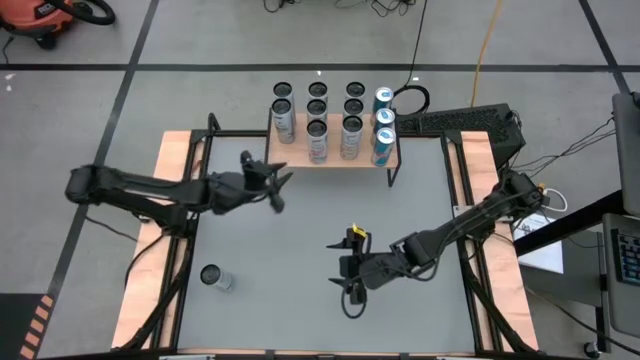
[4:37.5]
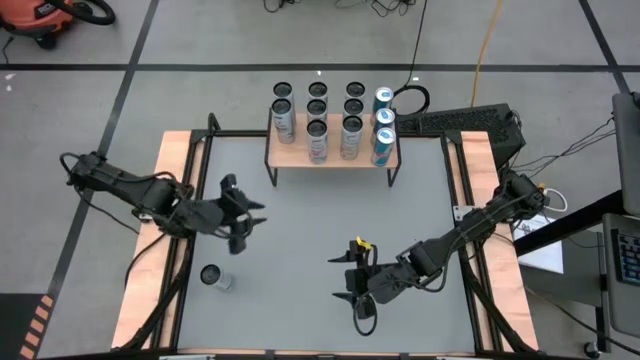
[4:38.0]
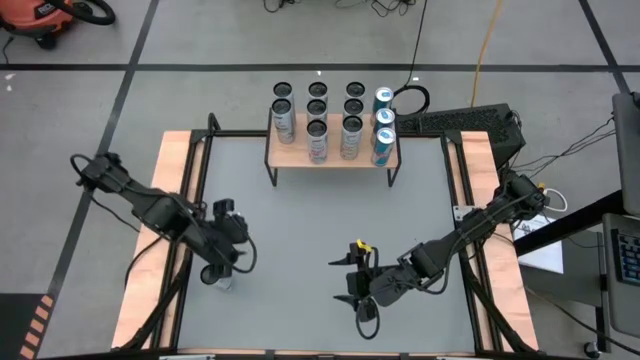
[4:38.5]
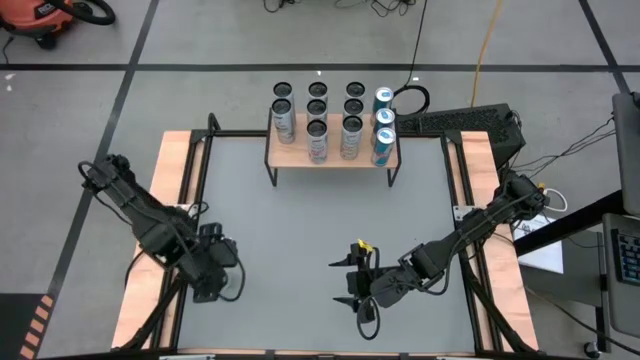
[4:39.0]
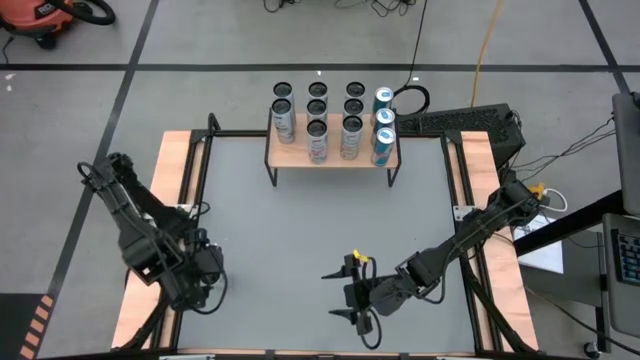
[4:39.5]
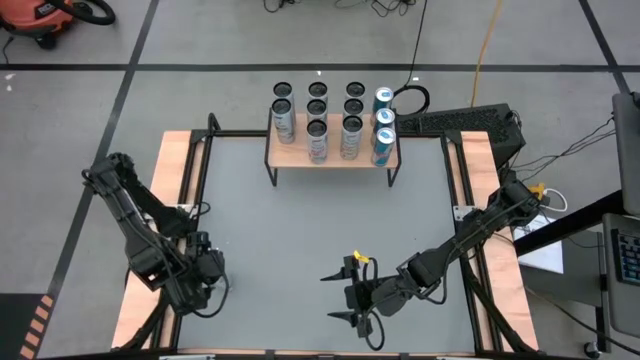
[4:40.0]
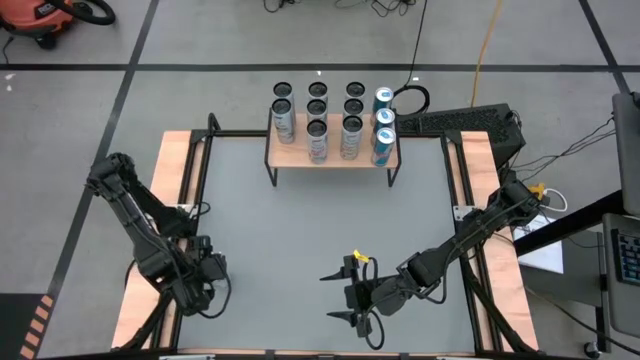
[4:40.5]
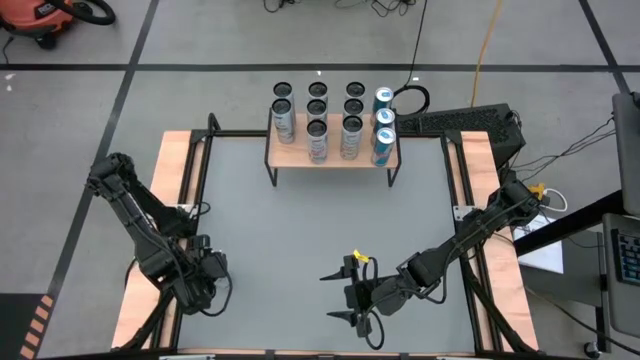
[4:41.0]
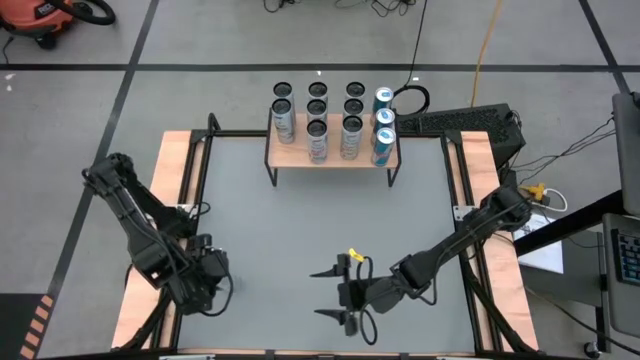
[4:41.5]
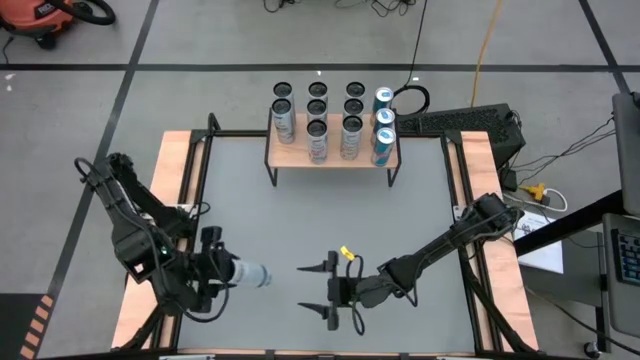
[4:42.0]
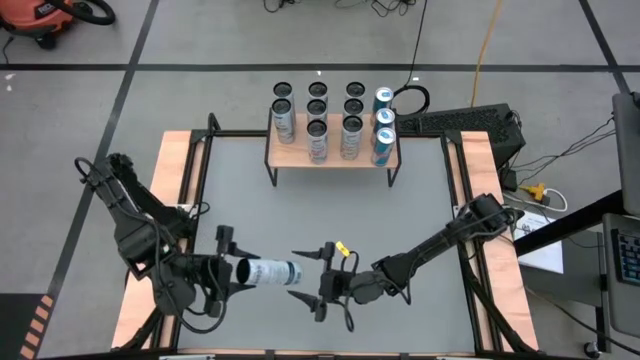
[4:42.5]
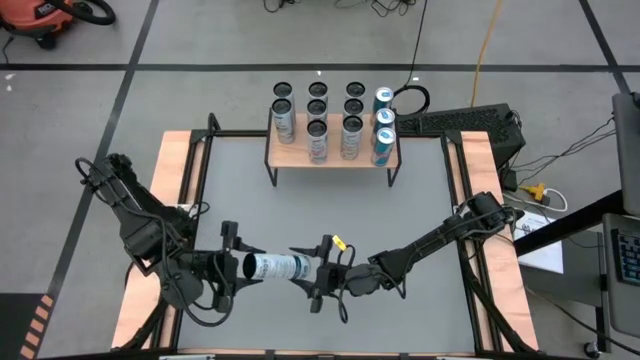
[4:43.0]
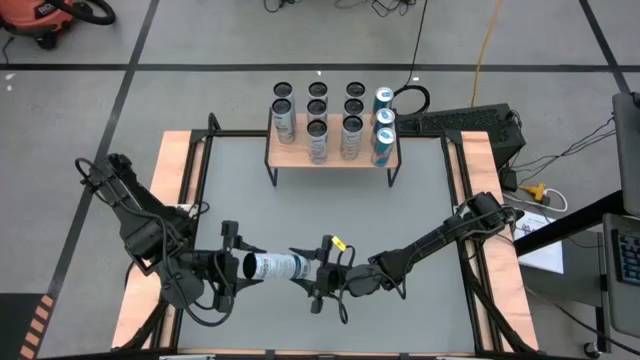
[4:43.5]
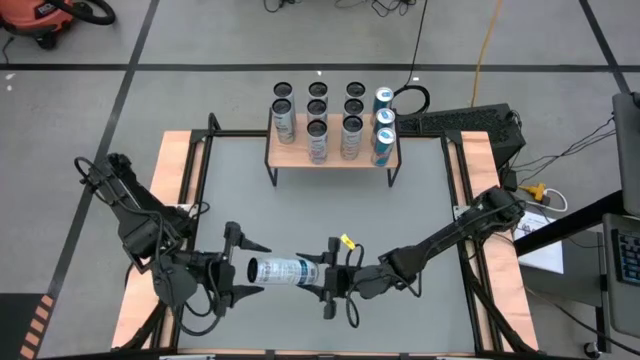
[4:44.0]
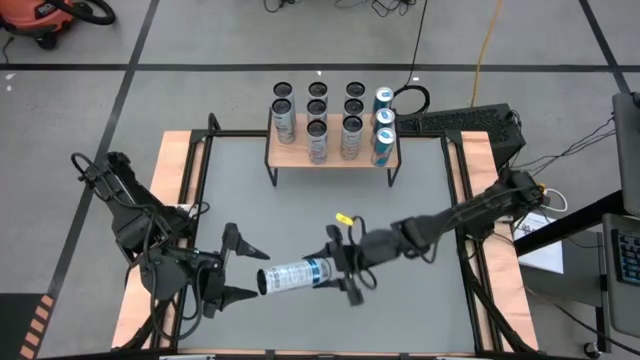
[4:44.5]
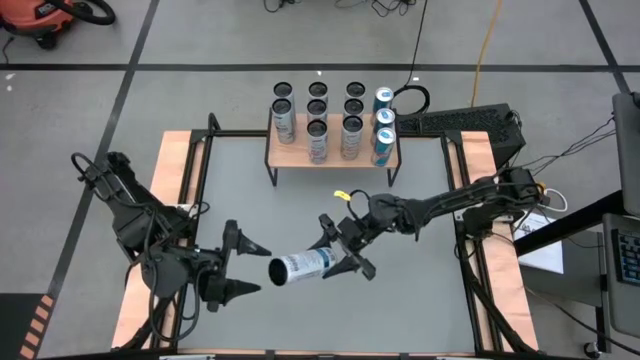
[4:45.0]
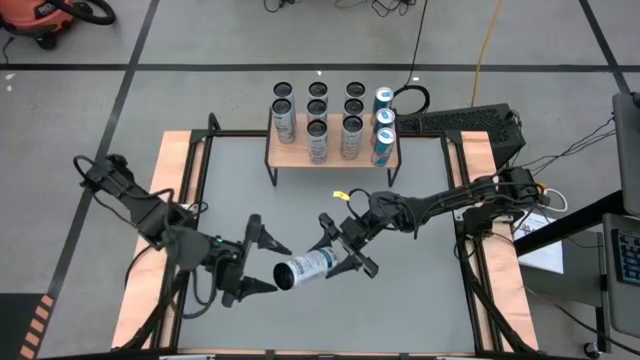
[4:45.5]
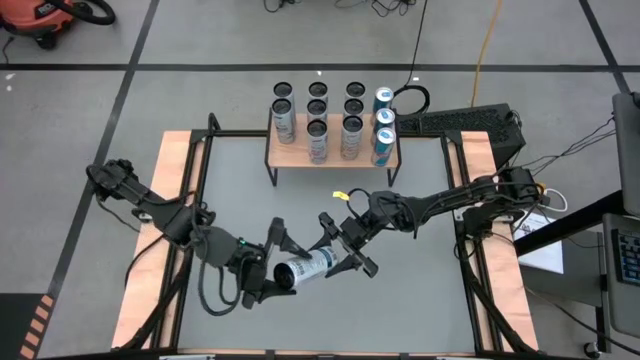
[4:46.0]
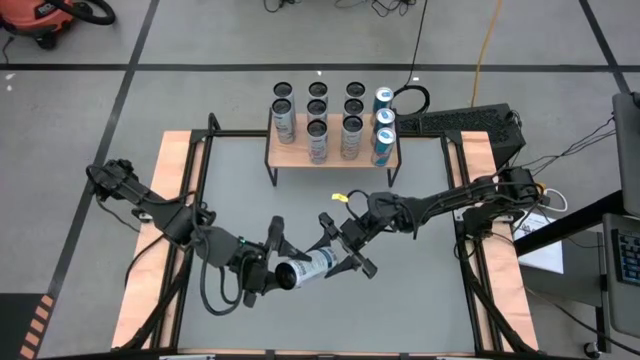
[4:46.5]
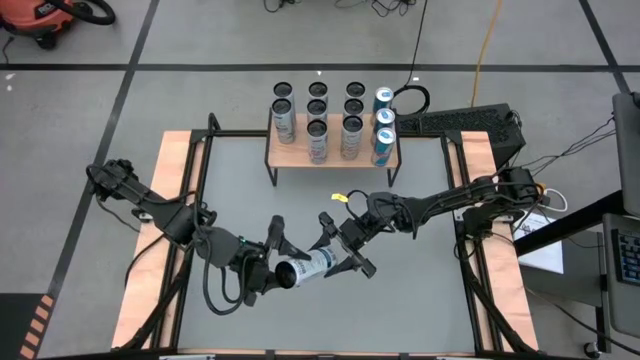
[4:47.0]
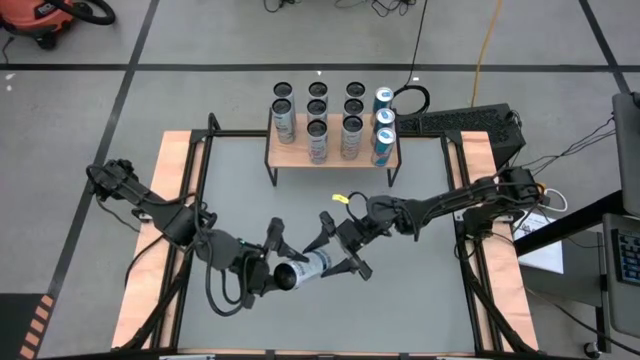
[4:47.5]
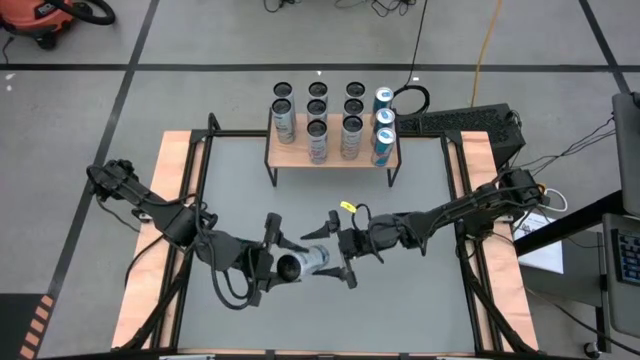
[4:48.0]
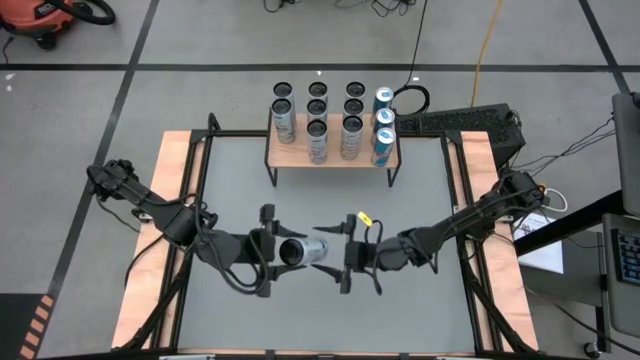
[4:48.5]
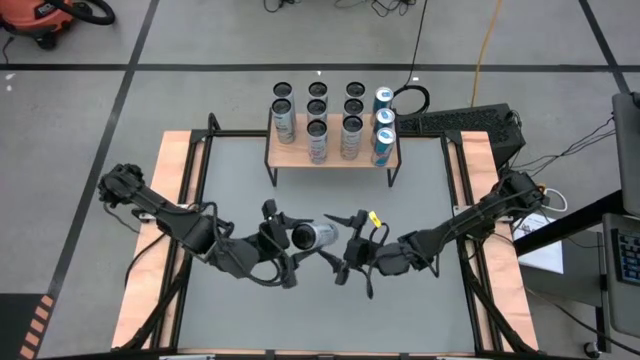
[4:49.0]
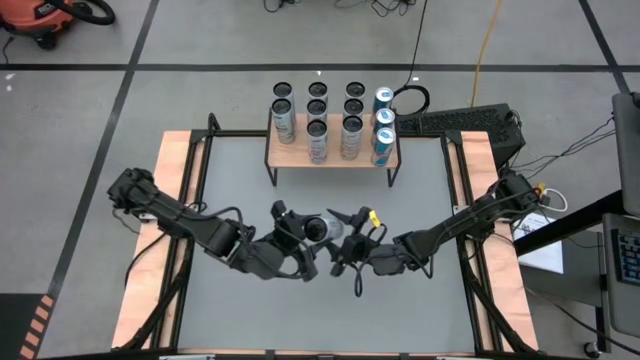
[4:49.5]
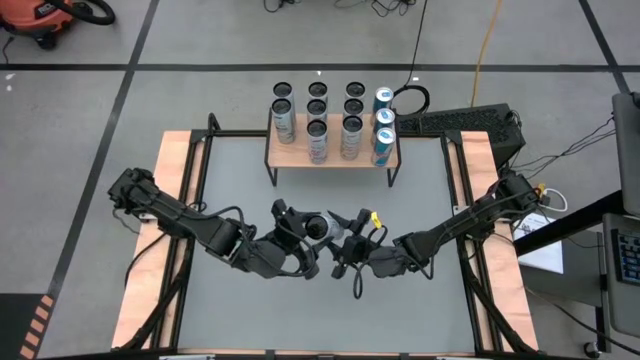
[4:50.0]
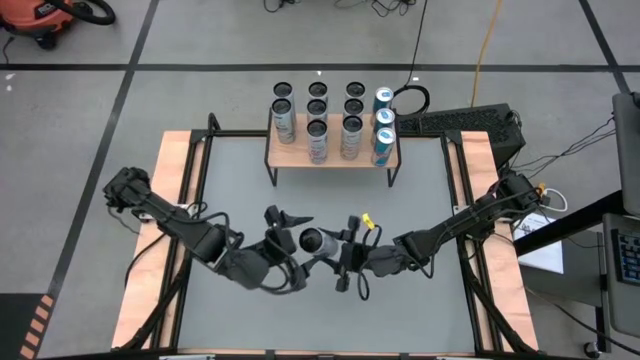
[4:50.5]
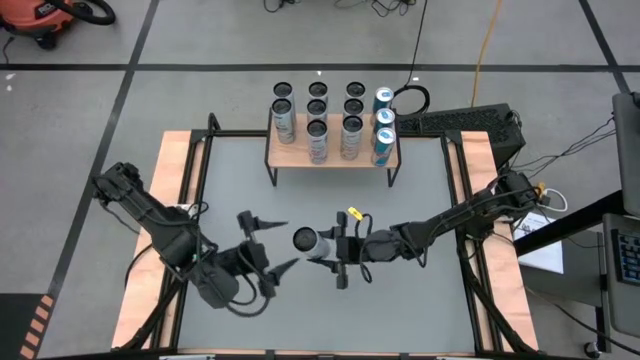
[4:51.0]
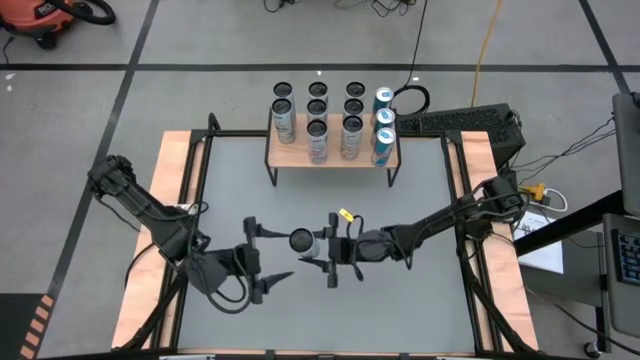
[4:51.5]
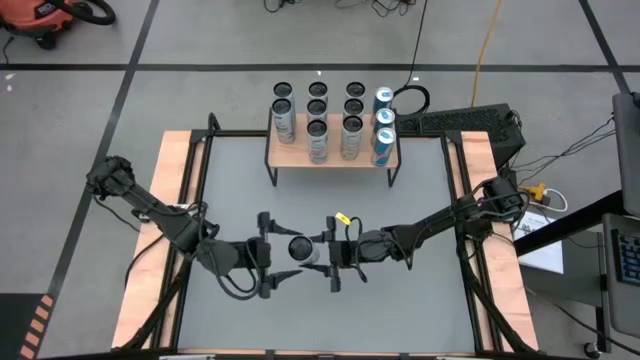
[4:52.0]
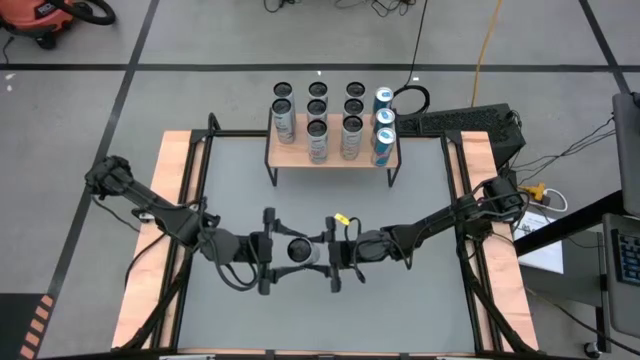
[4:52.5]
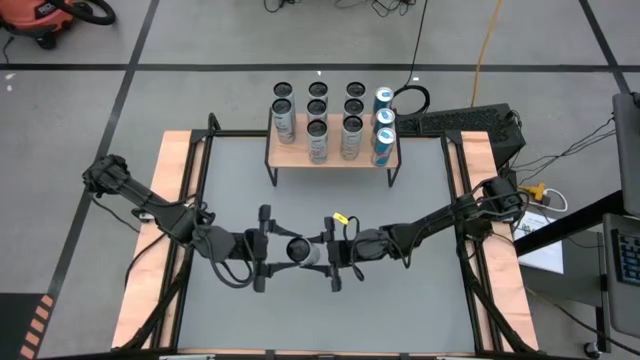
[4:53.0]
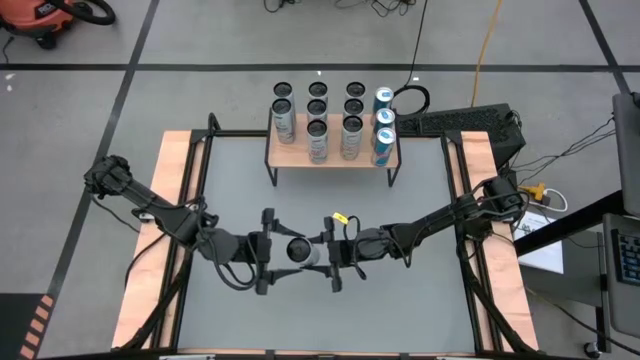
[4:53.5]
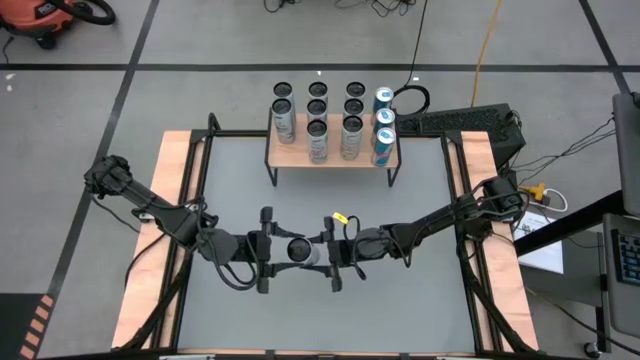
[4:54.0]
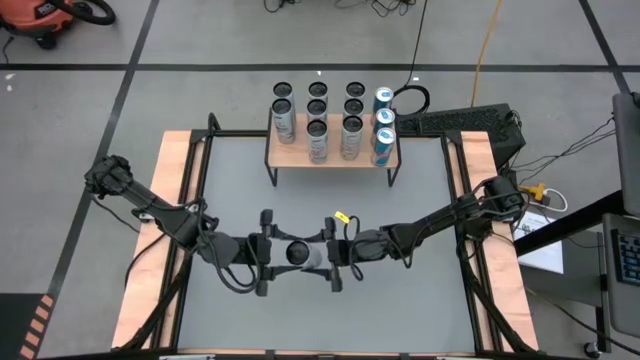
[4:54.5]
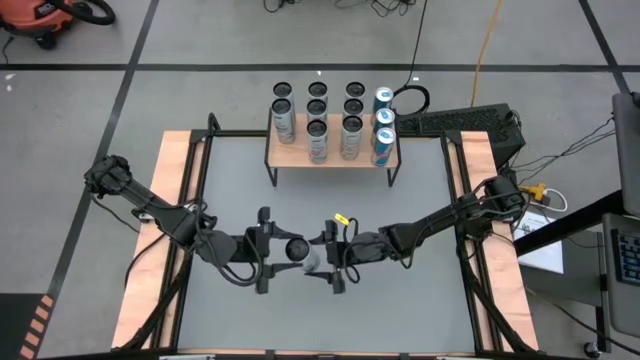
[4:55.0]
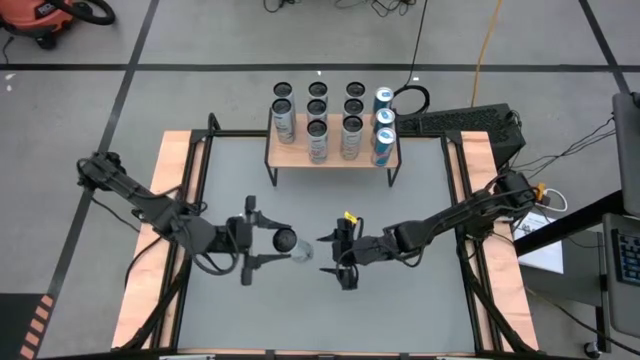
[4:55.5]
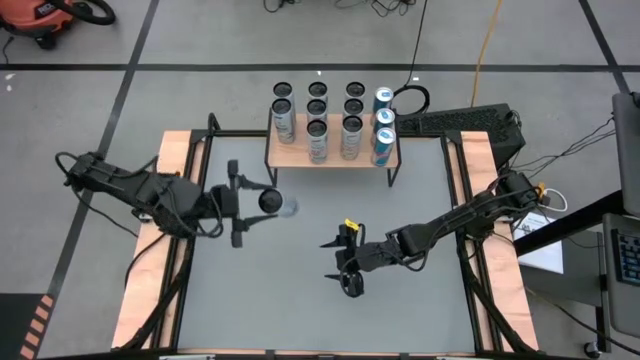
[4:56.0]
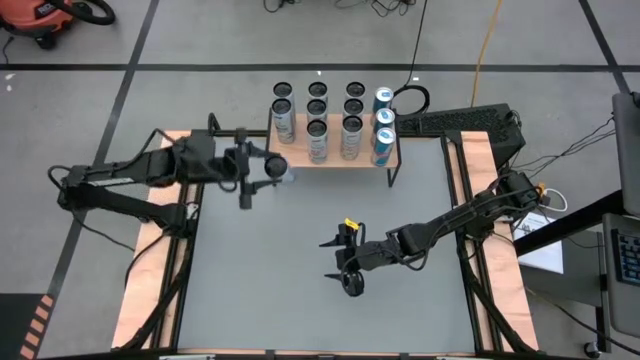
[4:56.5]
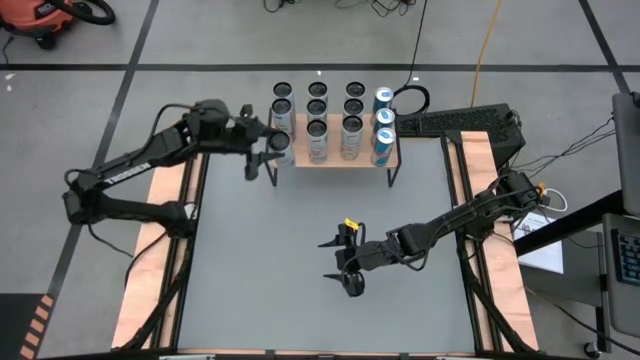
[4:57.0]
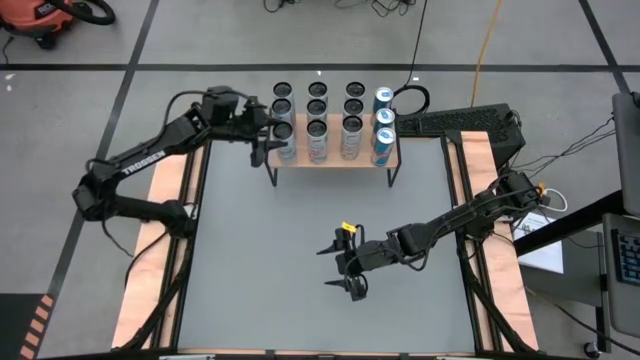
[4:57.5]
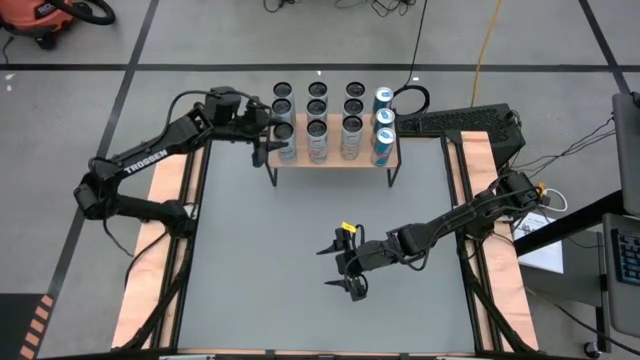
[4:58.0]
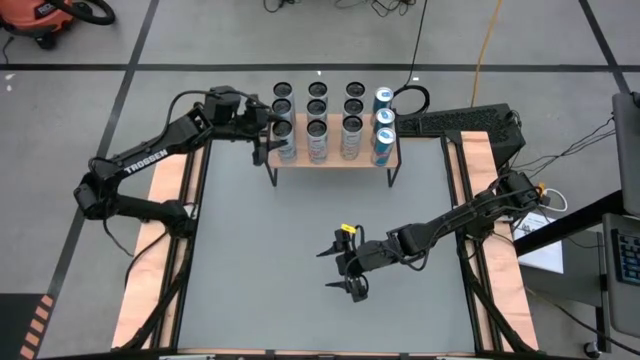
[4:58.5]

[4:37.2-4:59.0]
Task: Place canned beverage on shelf
Put the white blue soda can on the shelf aligned with the other white blue soda cans
